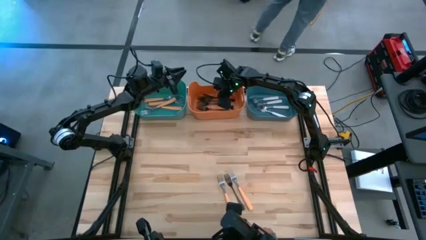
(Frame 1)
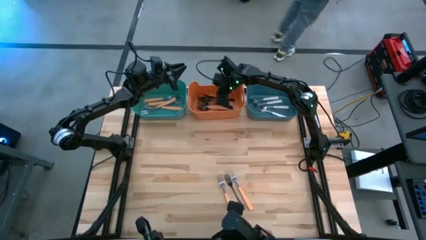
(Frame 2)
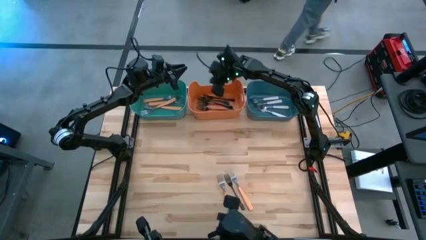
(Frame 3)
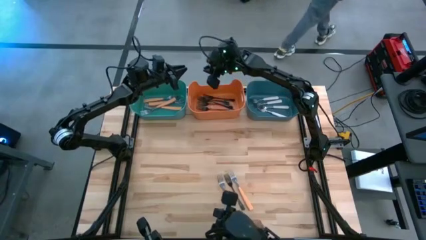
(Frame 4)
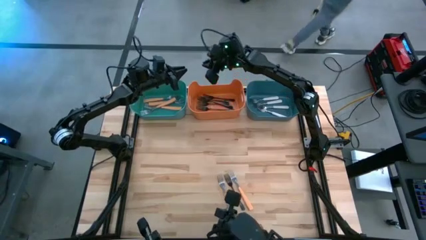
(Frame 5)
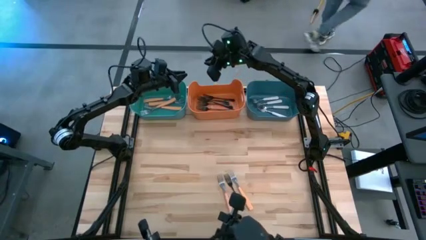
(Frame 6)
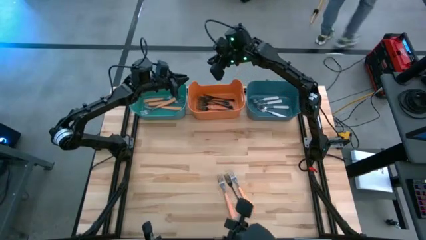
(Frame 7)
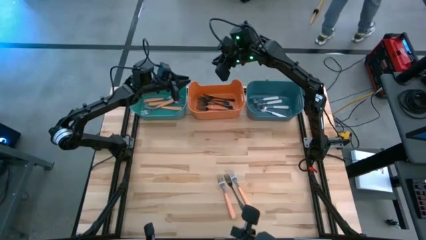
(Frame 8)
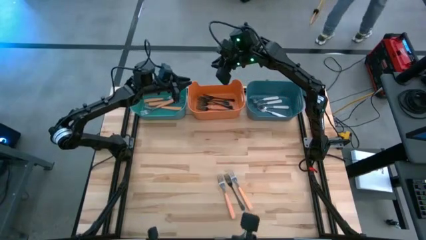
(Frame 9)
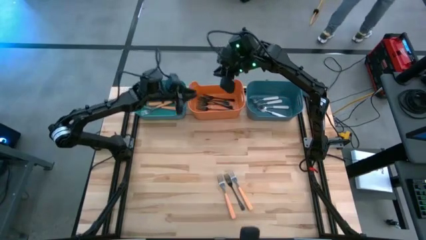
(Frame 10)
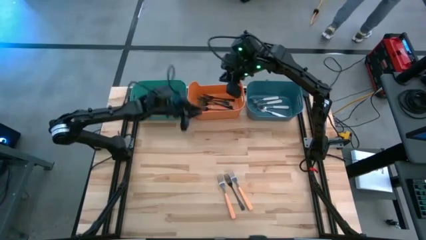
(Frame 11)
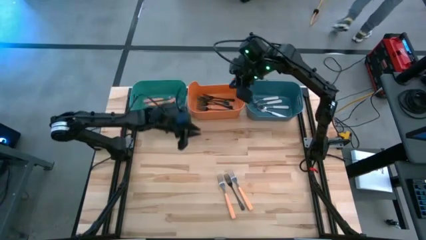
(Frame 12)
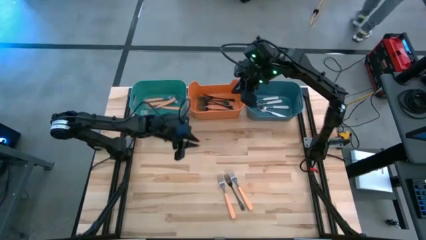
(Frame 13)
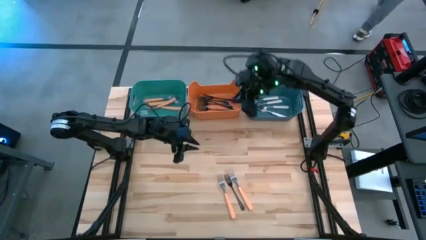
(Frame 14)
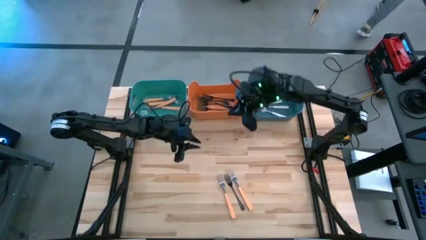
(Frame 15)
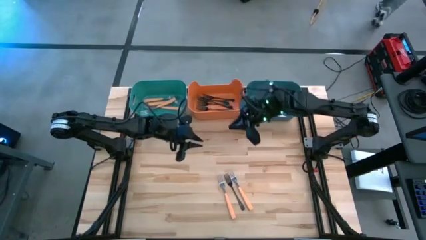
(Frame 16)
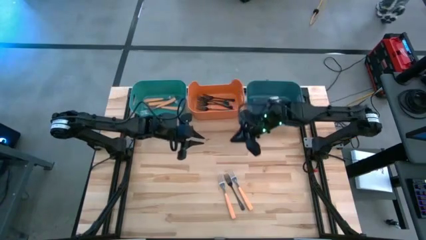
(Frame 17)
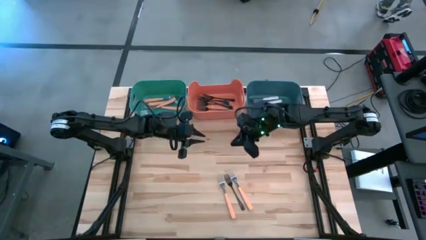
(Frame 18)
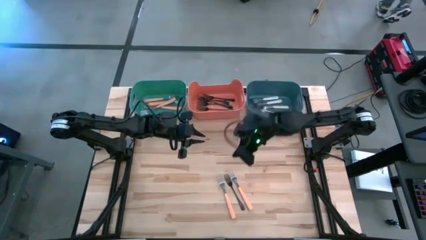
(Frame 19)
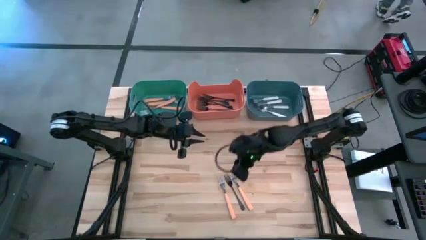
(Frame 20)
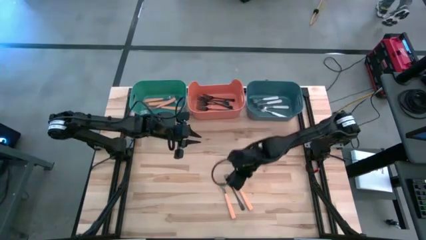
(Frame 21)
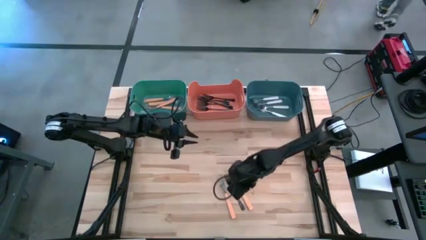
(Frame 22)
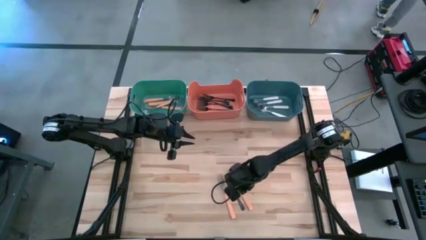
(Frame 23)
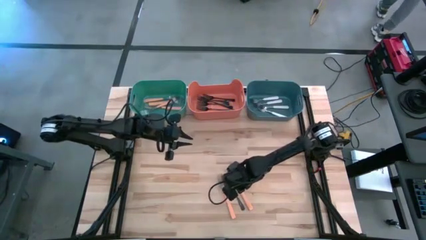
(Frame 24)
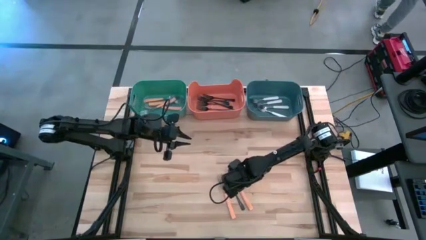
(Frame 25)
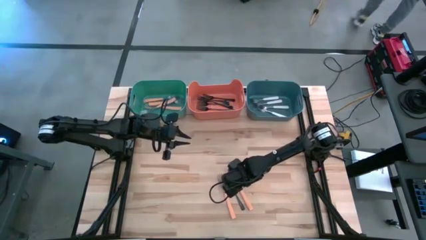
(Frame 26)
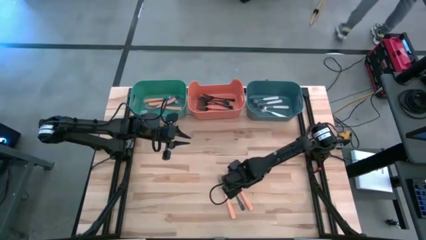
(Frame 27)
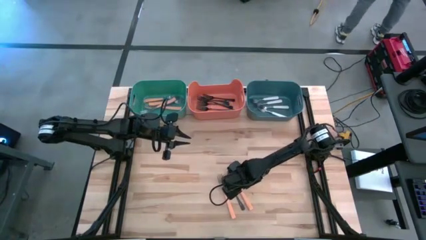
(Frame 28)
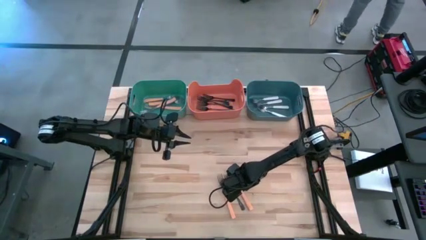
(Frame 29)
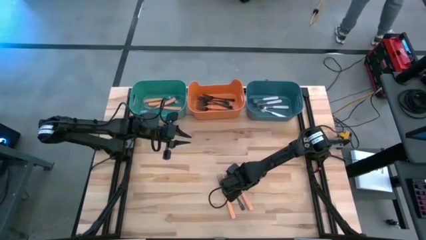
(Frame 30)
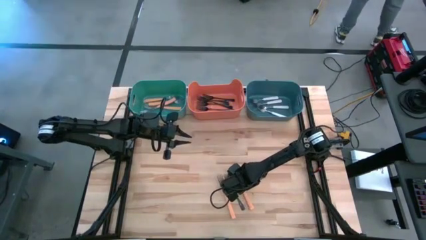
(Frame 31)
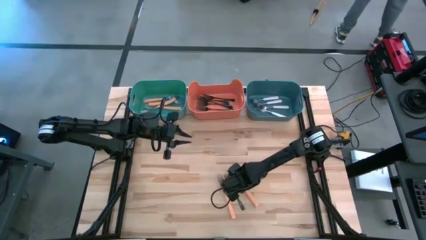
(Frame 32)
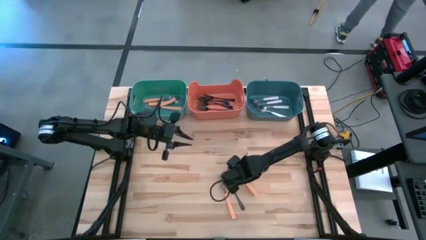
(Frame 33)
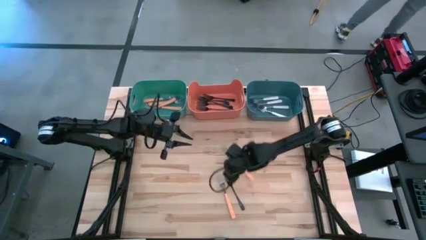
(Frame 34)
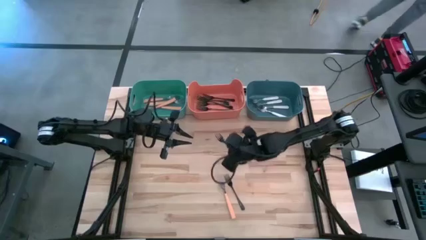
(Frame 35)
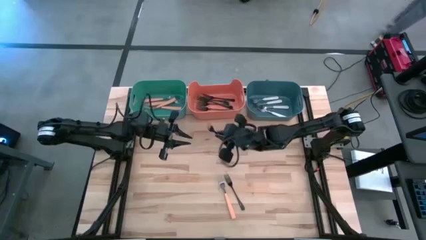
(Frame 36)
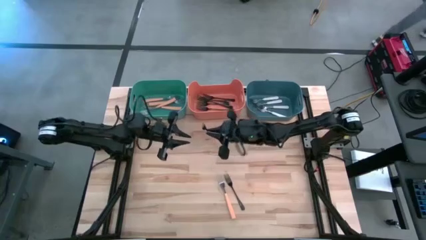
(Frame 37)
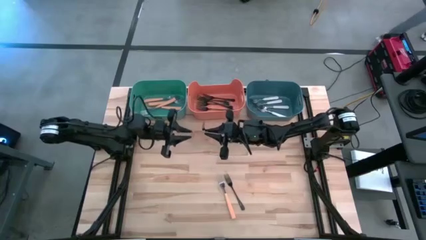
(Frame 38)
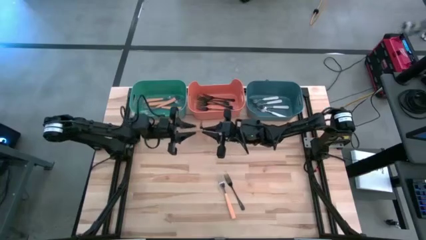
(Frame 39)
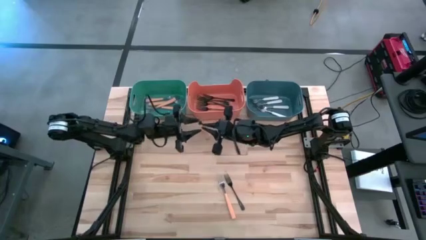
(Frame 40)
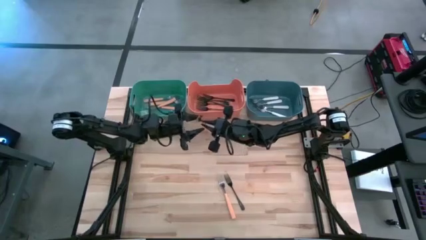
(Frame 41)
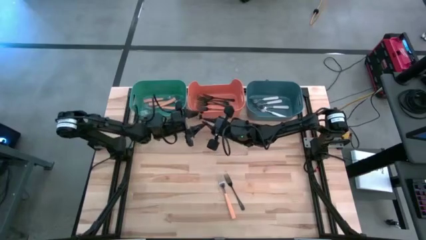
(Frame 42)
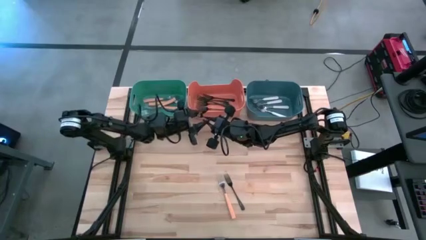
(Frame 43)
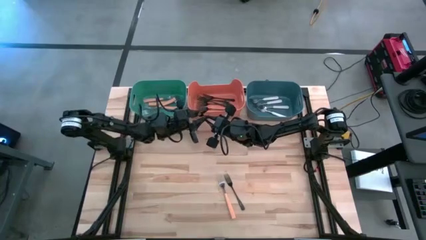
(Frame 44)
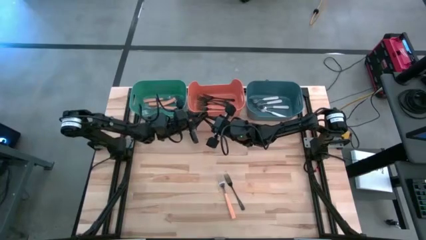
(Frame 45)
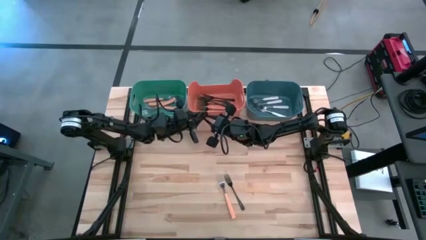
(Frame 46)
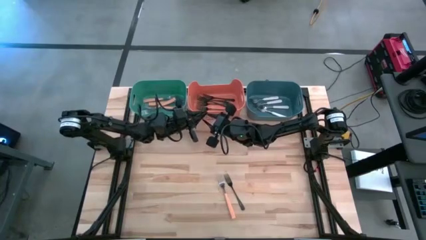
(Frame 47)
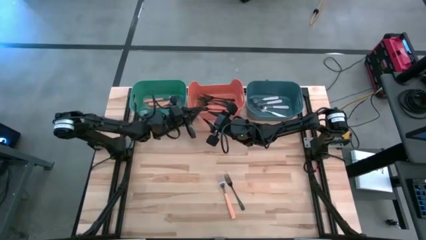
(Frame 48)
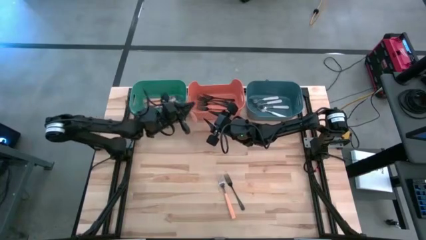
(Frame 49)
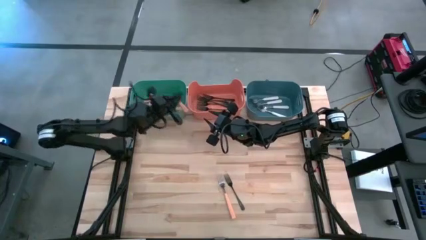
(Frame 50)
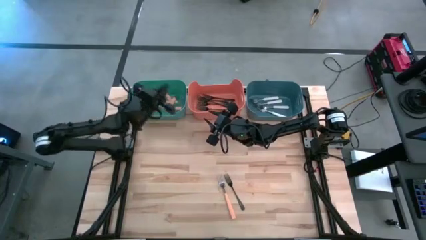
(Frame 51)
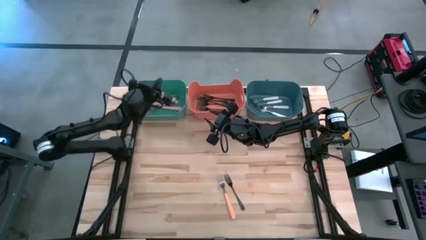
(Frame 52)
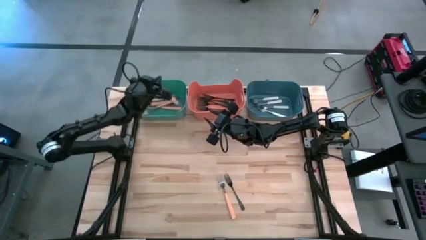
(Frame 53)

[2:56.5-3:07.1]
Task: Sort silverware by color (type)
Put the orange fork into the green bin

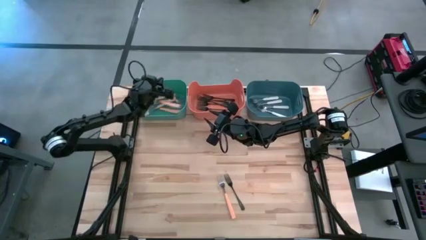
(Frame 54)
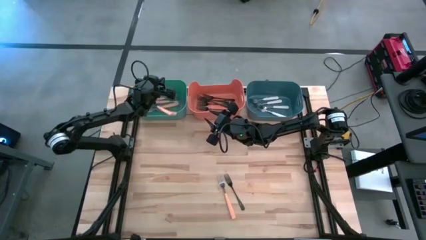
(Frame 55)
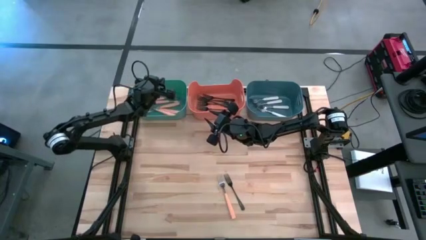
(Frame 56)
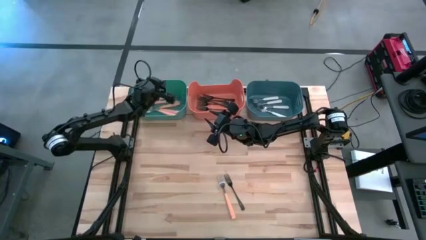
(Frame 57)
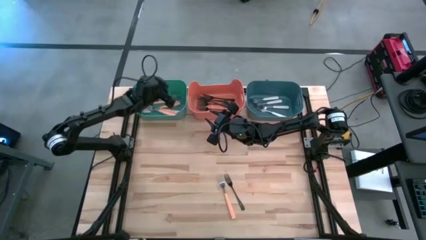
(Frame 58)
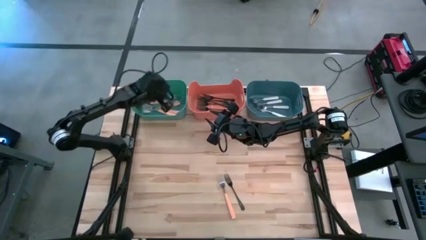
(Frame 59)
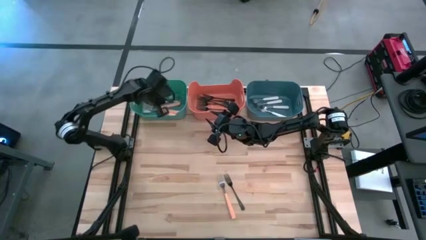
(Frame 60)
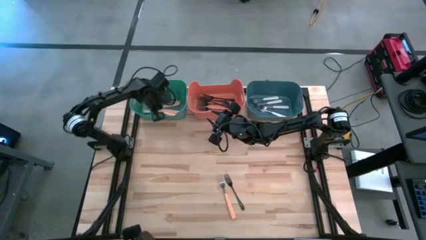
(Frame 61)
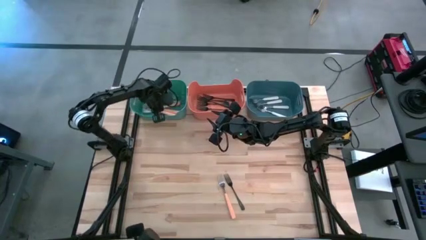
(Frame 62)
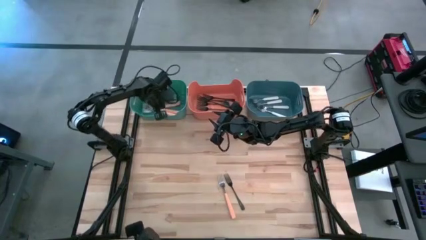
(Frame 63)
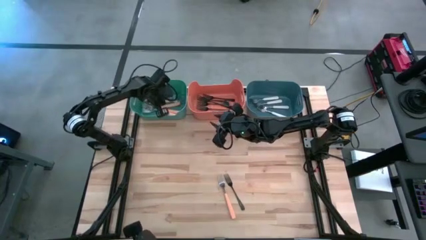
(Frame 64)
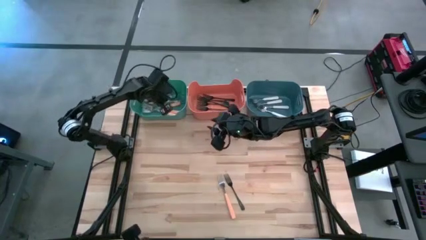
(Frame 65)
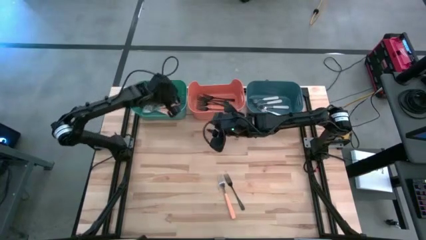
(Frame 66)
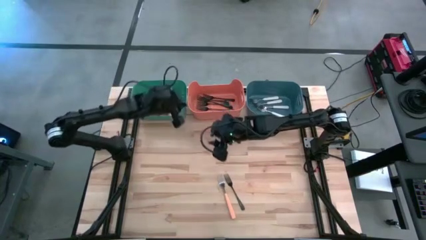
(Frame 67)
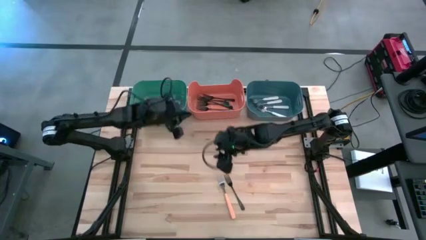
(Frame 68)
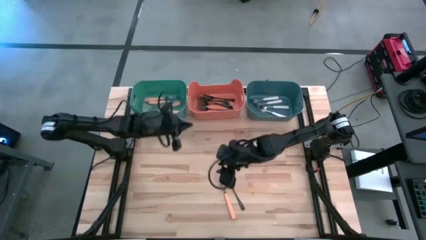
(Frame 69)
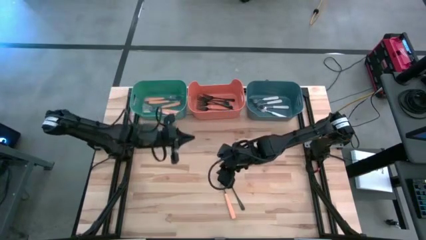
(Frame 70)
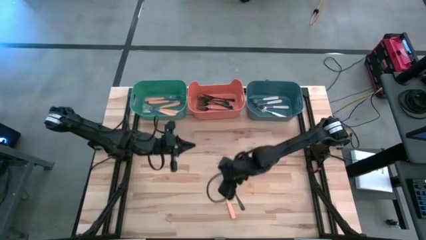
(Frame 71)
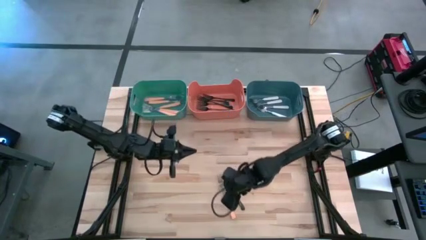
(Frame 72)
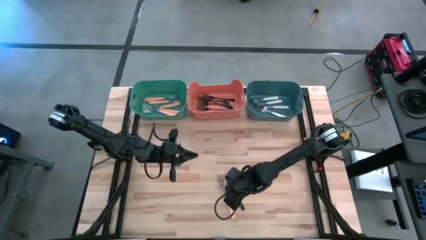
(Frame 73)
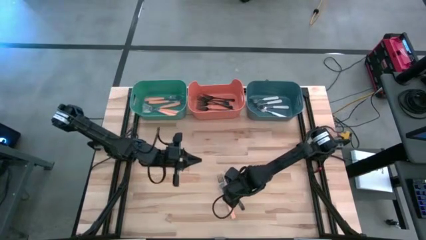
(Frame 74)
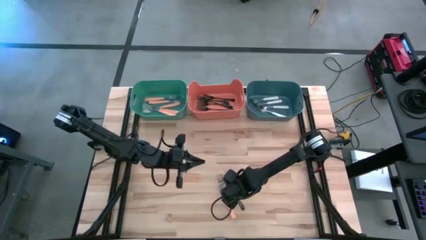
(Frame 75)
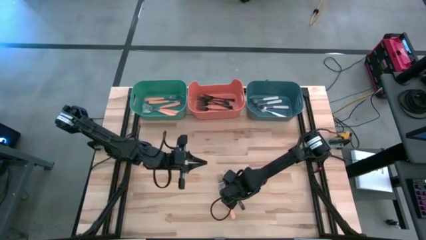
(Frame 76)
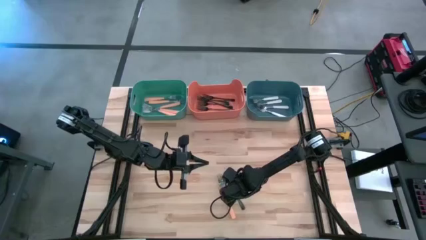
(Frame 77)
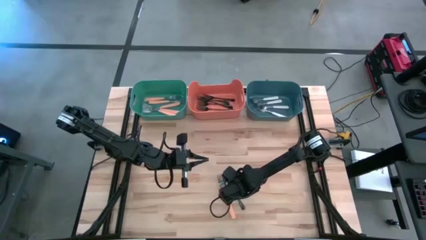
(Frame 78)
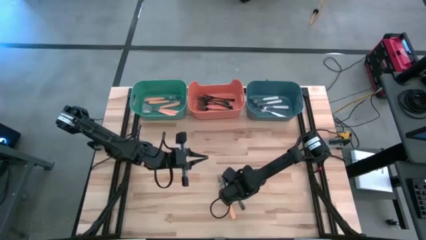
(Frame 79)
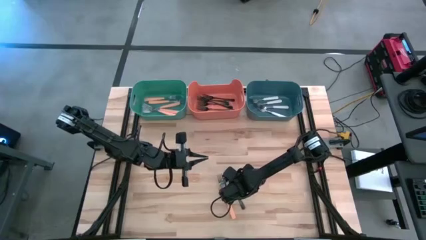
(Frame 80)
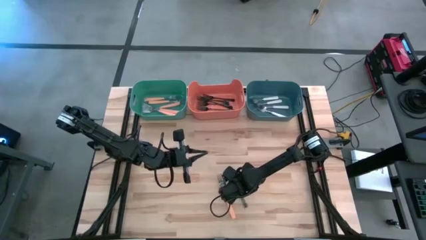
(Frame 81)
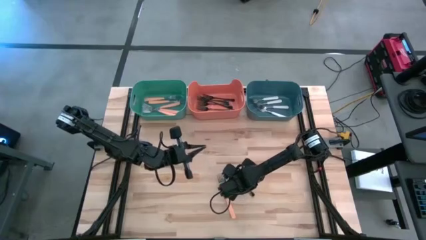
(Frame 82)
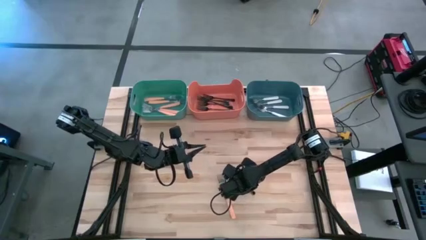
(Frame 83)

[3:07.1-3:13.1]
Put the black fork into the orange bin

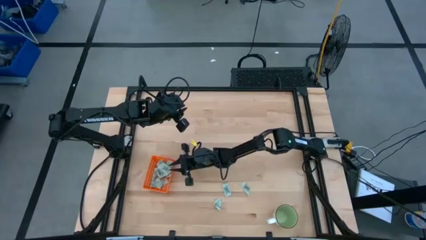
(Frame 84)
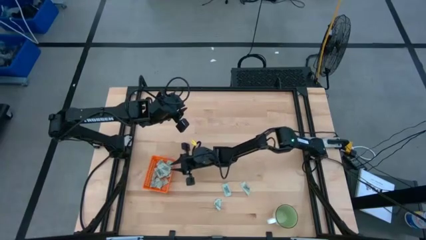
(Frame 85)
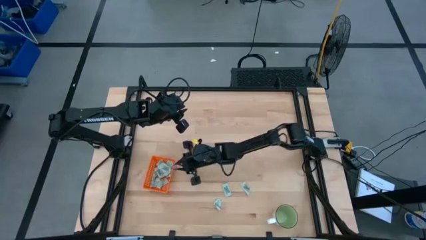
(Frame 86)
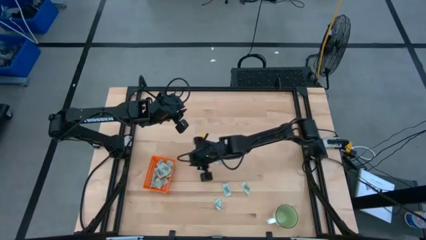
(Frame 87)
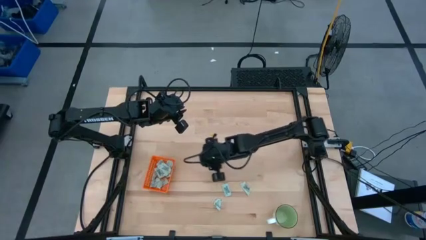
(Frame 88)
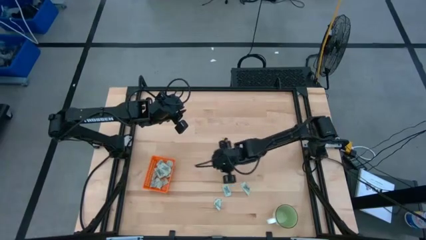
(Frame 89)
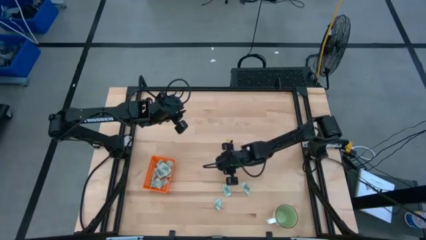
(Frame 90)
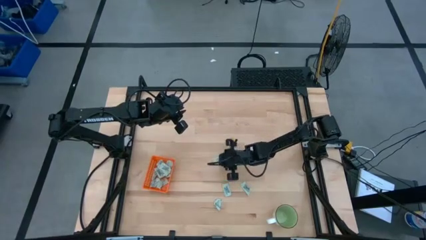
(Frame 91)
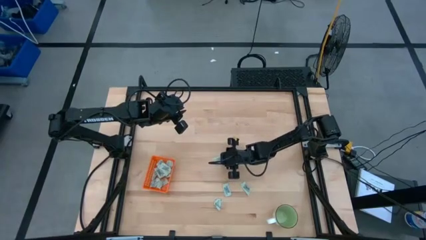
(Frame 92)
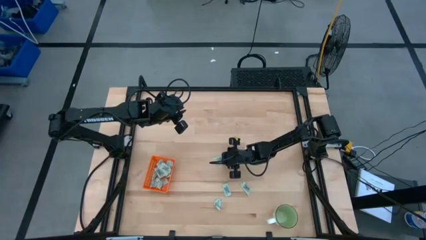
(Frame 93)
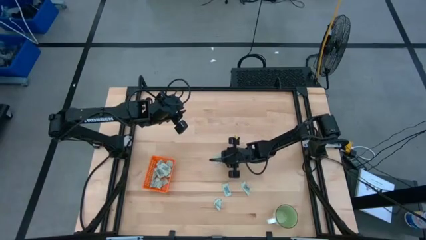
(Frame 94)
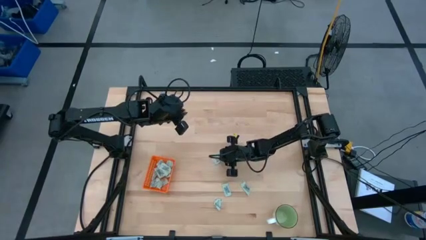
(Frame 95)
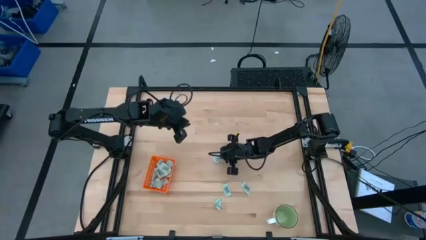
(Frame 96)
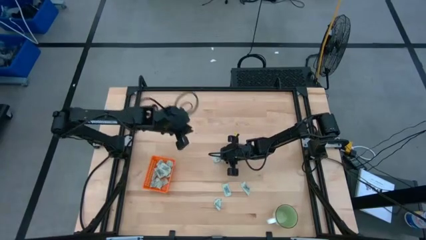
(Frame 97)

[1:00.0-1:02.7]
Task: Pick and place Stevia / Truvia into bins
Put the white stevia packet into the orange bin
